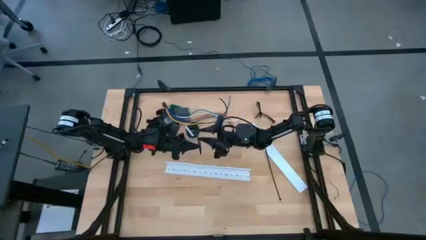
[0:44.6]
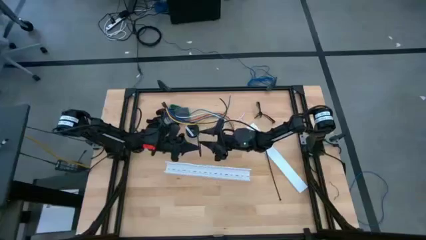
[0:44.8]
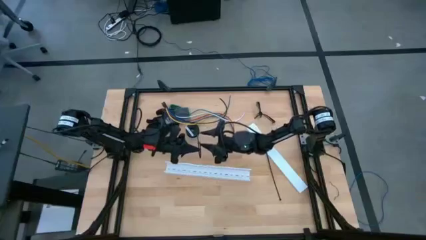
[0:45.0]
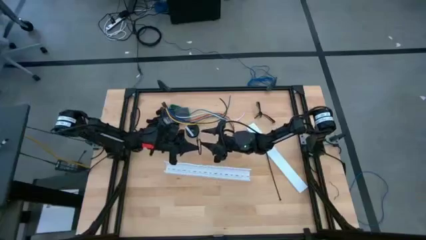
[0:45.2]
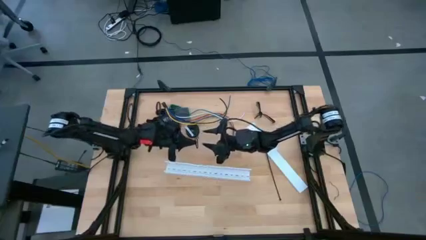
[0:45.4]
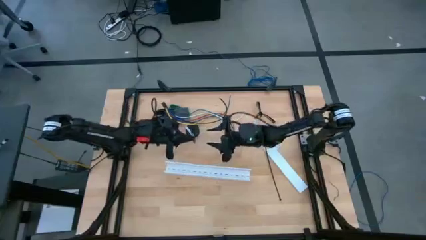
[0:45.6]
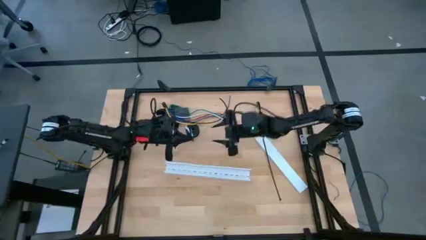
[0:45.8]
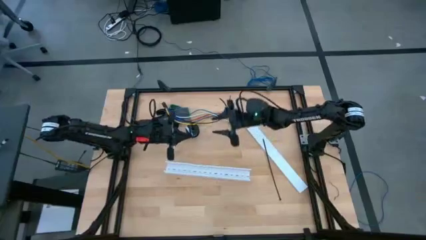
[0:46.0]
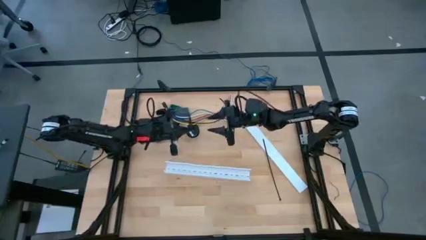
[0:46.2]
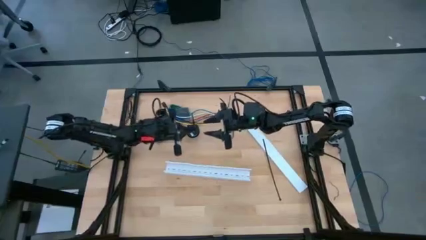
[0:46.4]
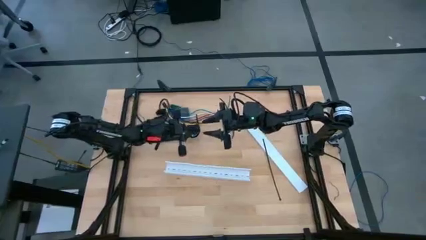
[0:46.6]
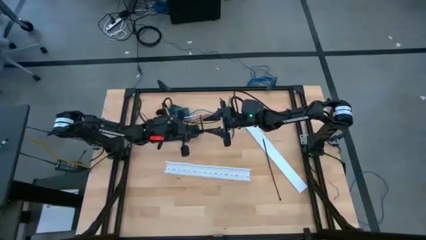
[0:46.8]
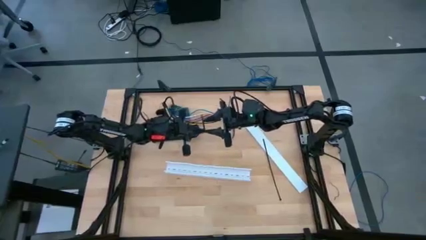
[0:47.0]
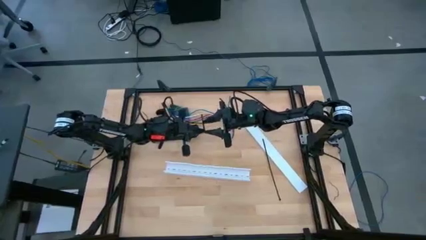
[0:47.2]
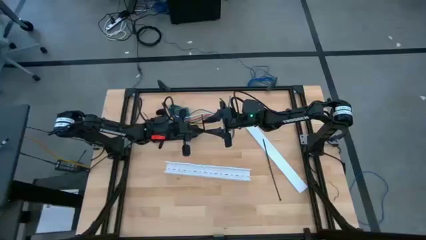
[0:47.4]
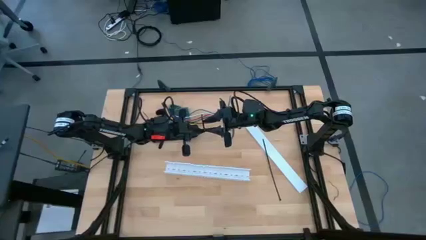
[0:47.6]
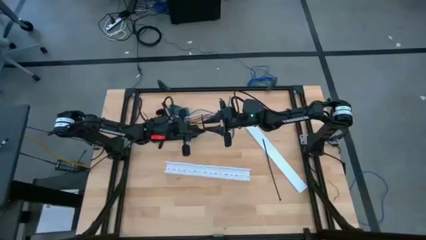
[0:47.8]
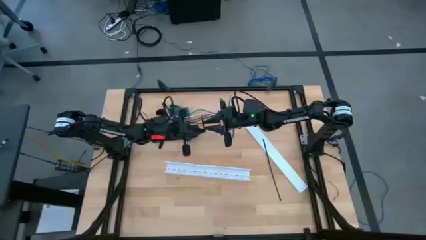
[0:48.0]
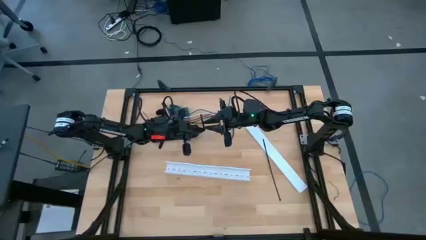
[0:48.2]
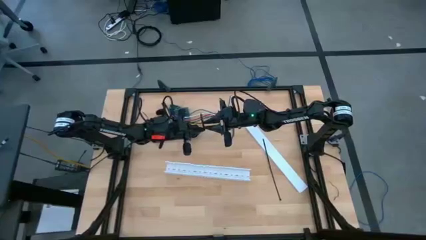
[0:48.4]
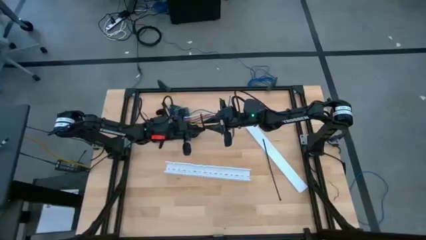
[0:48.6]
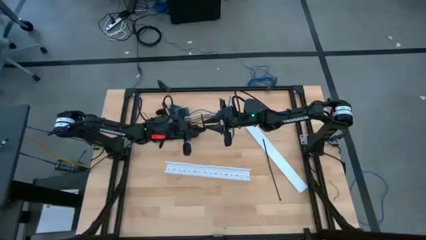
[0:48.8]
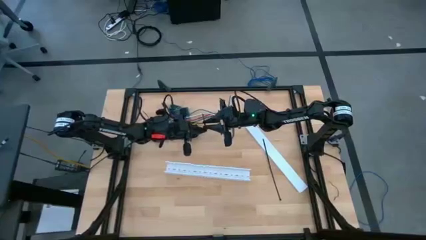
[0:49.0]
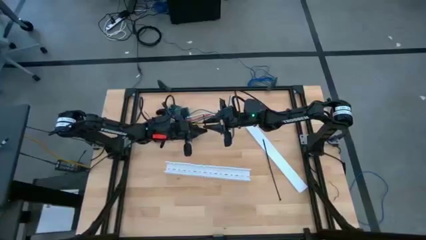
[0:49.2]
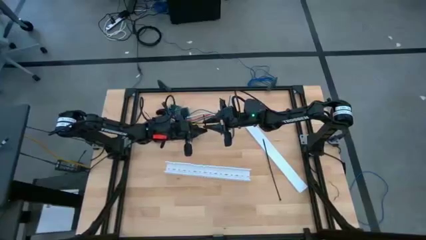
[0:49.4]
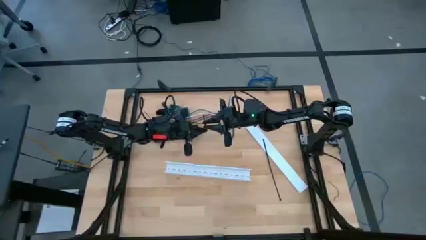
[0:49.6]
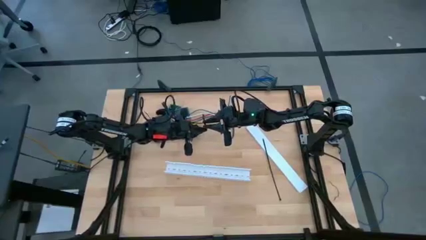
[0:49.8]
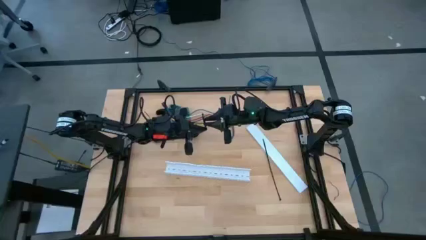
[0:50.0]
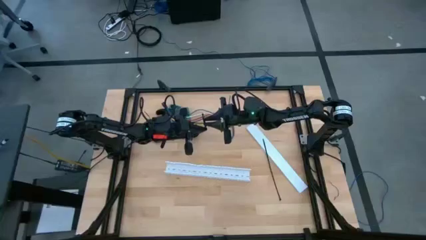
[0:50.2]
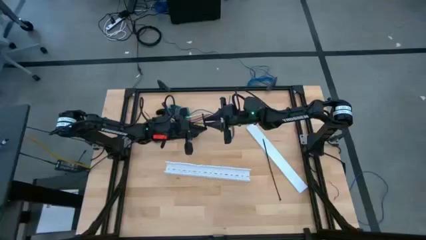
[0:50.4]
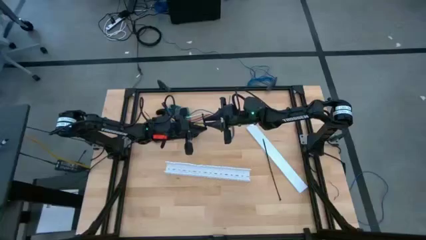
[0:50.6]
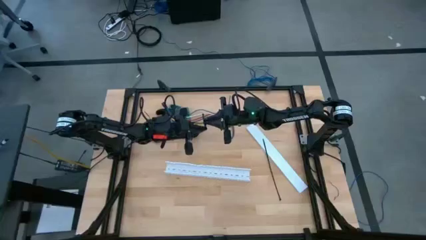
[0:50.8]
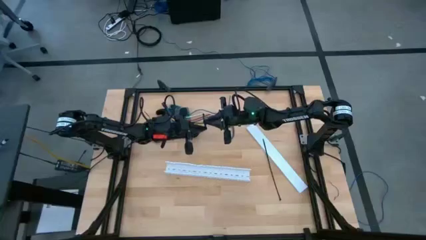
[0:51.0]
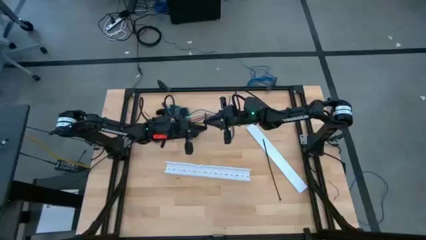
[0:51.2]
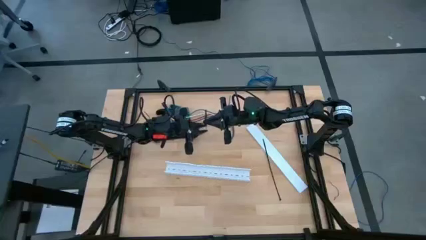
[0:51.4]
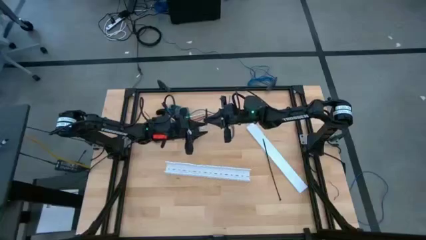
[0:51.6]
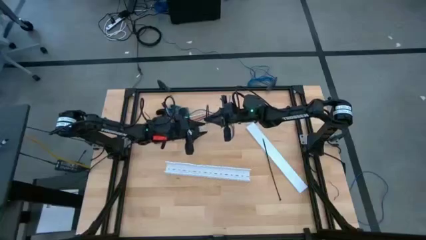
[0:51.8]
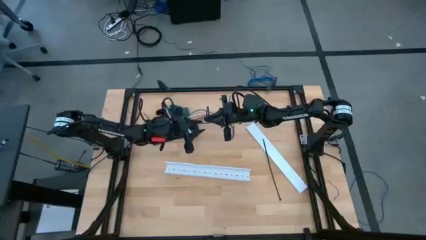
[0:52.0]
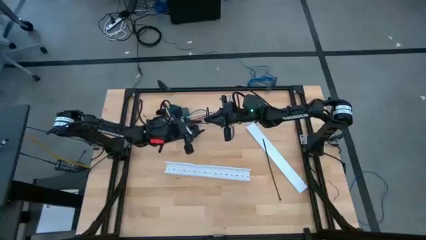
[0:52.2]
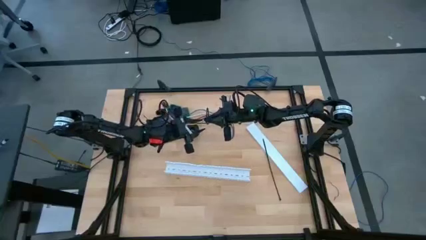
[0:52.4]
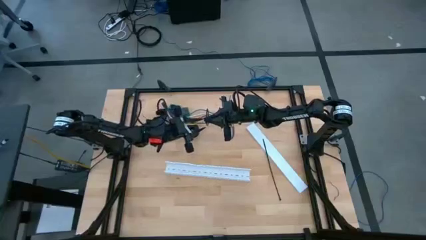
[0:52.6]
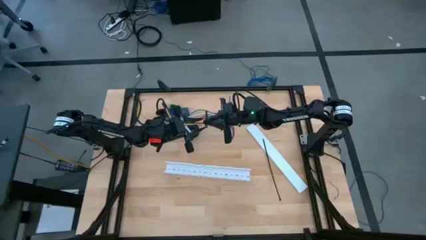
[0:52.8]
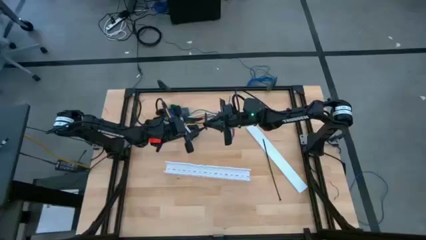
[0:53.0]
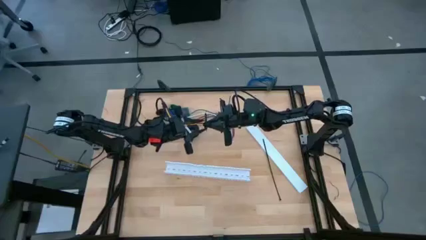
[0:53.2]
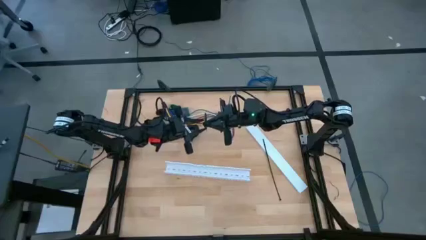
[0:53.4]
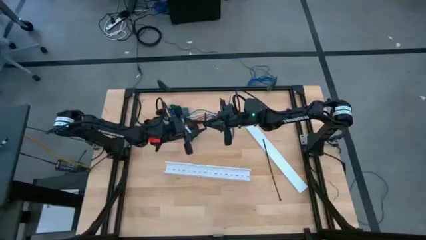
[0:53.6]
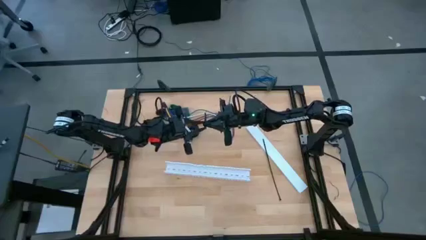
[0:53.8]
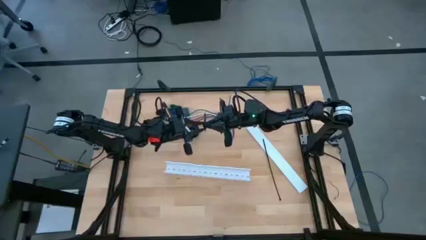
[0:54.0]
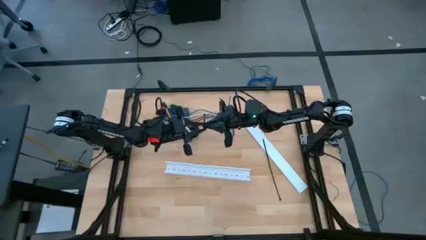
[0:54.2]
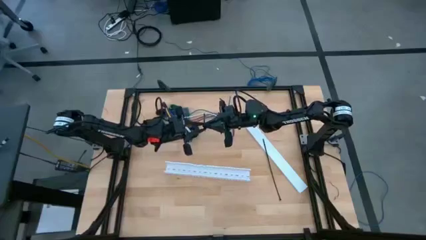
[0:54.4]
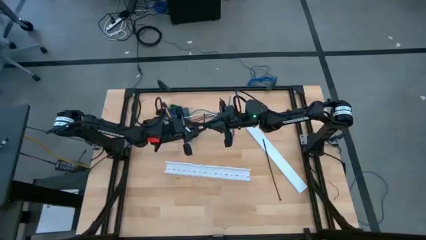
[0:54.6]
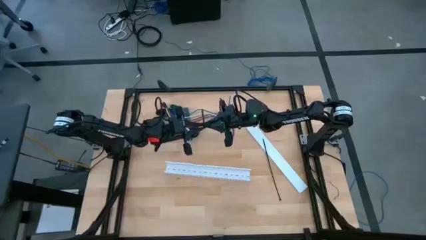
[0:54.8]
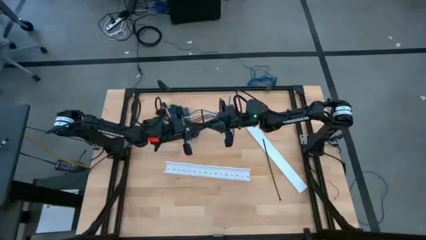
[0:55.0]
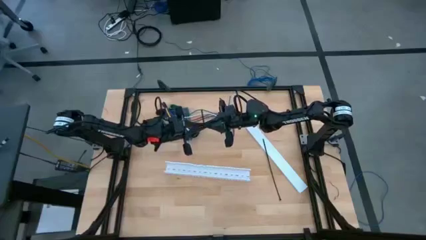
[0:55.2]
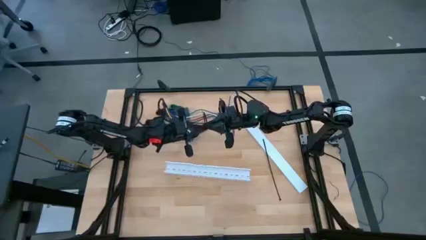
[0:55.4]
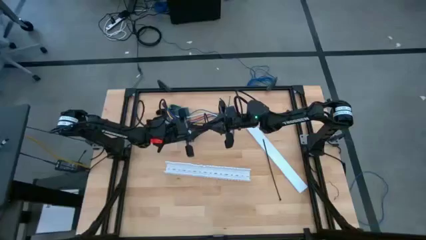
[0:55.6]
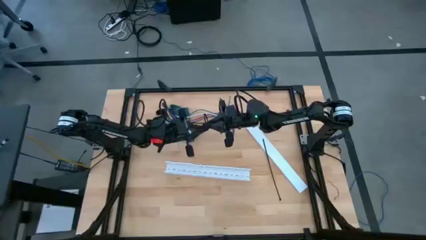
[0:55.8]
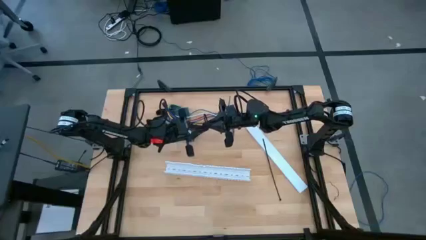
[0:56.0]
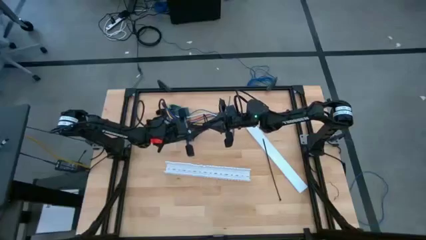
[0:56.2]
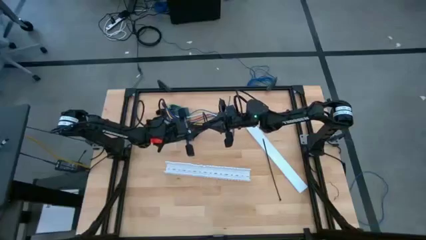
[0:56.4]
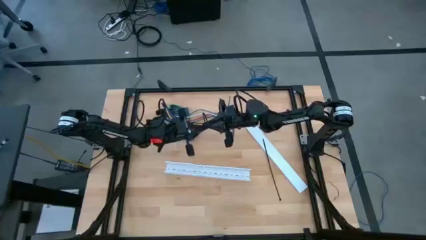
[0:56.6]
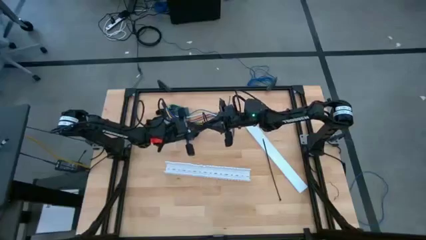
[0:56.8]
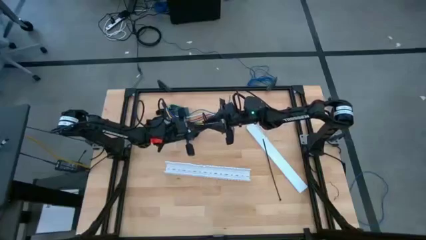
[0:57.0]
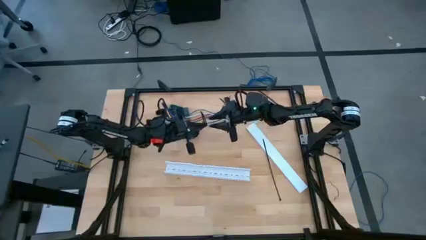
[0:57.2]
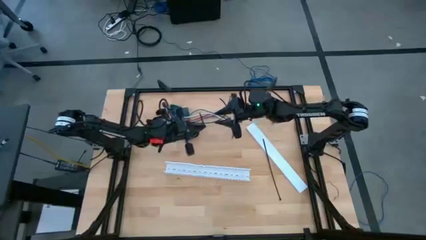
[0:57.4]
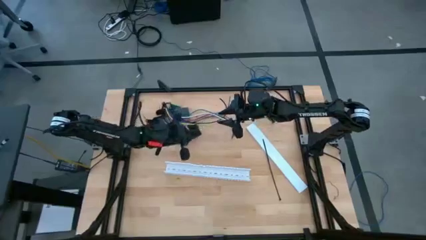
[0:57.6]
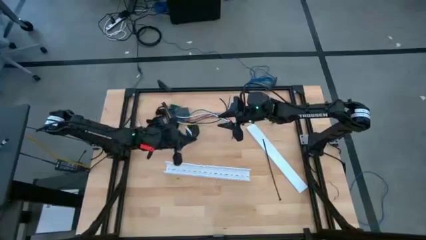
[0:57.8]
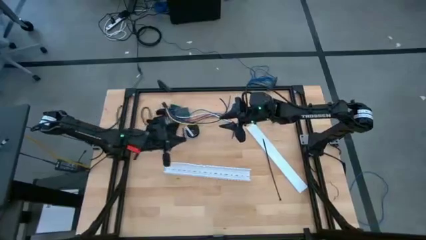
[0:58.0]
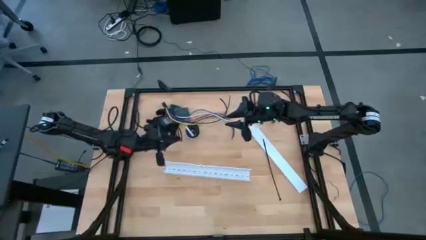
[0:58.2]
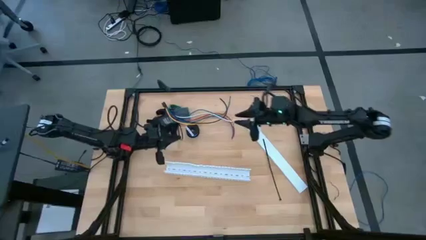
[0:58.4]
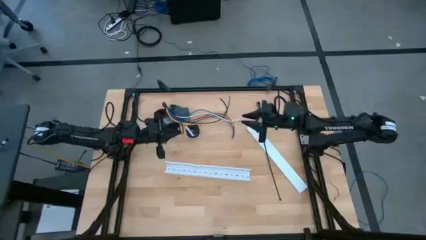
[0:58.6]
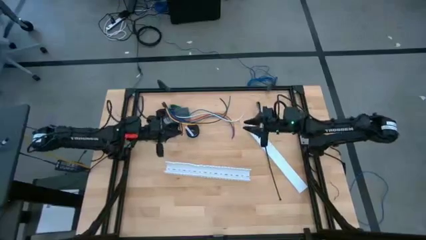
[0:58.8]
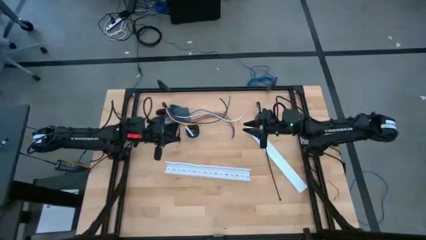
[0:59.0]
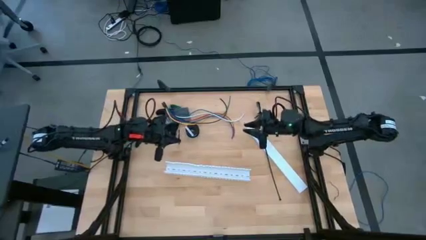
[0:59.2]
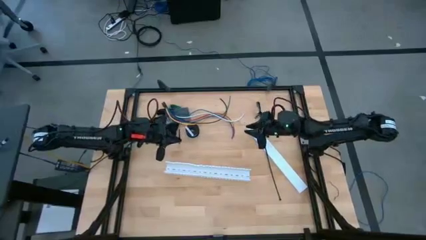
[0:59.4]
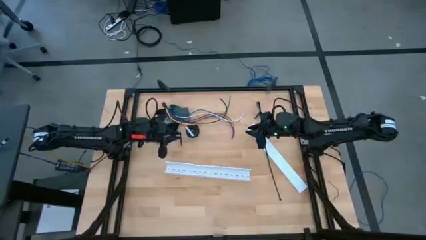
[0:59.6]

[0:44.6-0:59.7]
Task: Ziptie cables
Wrap the cable wires with the black zip tie
